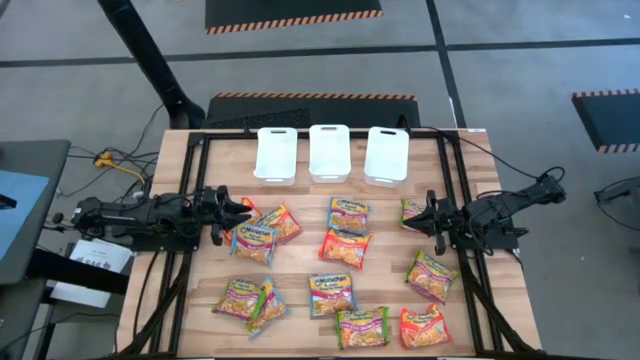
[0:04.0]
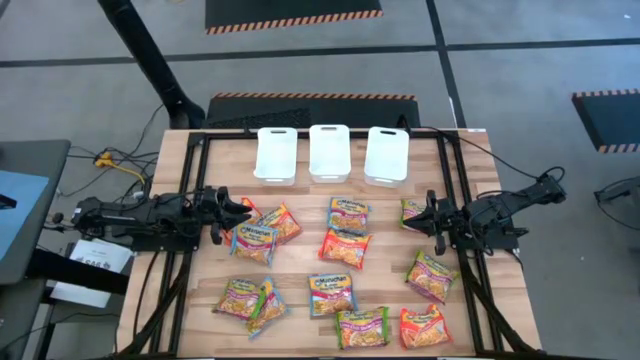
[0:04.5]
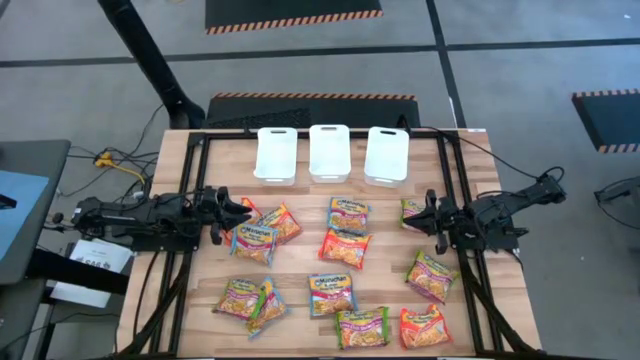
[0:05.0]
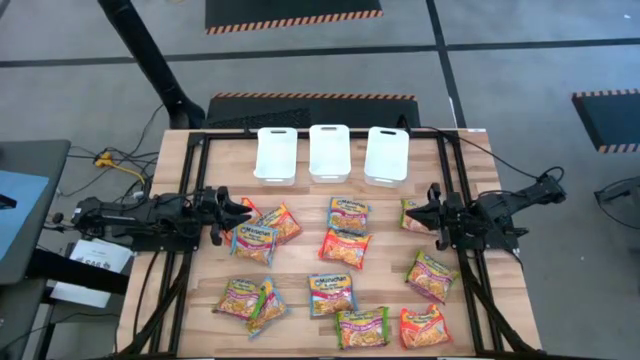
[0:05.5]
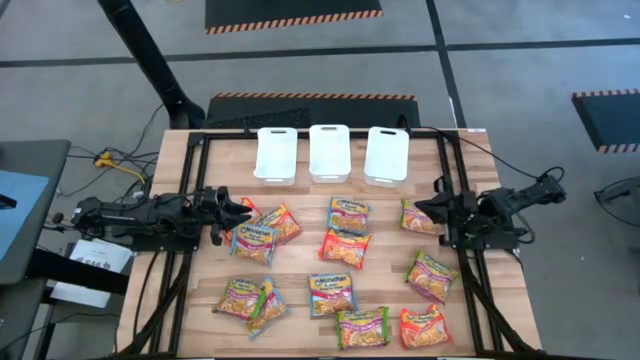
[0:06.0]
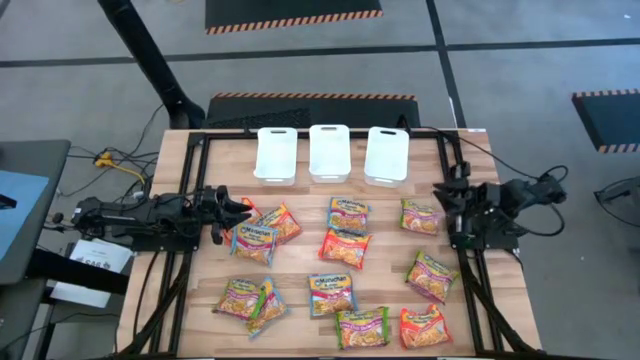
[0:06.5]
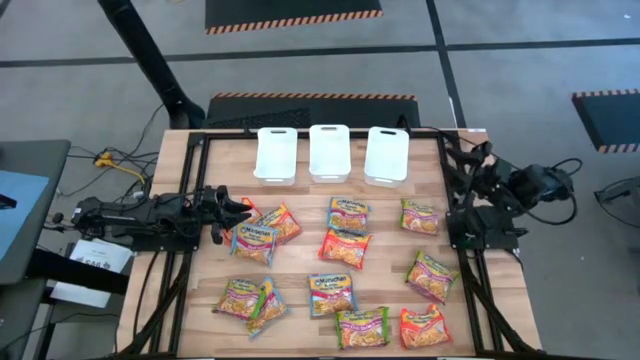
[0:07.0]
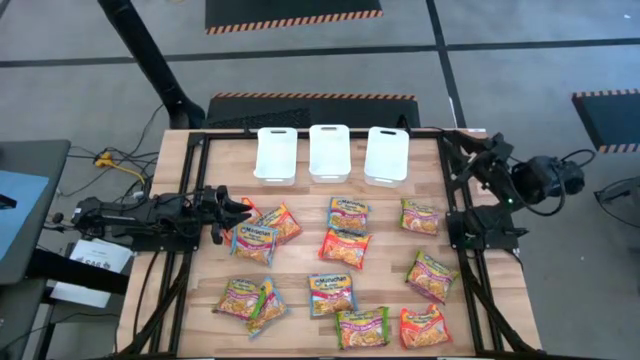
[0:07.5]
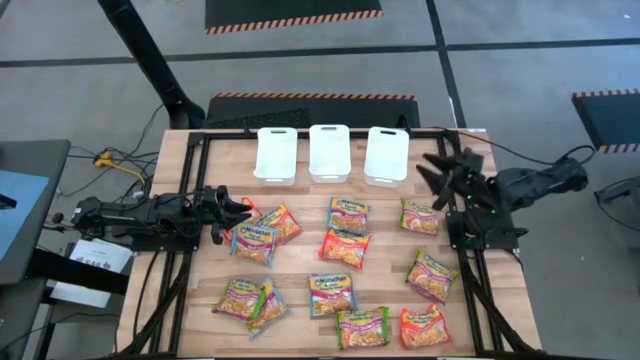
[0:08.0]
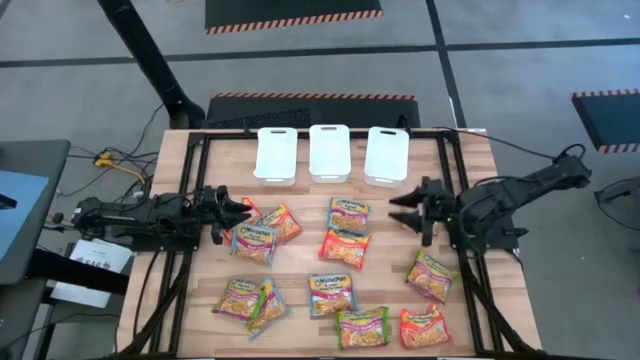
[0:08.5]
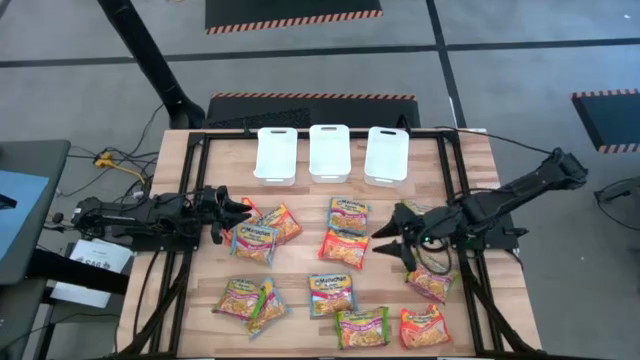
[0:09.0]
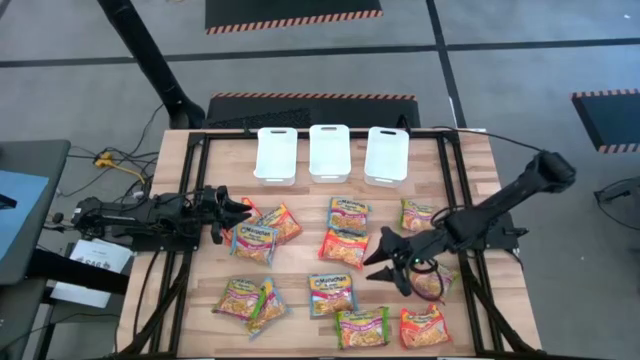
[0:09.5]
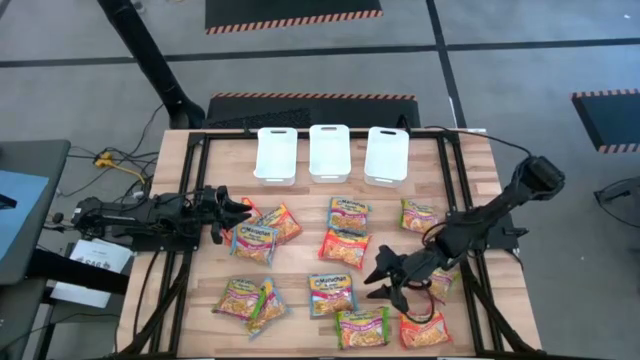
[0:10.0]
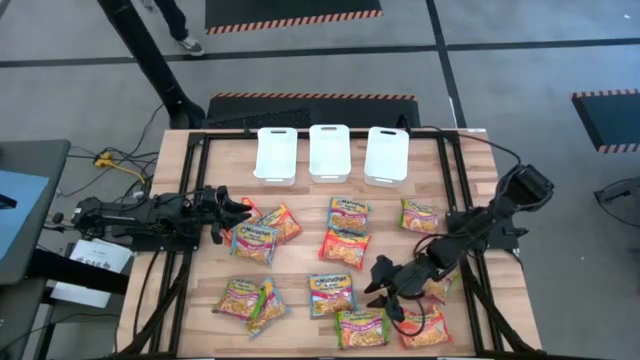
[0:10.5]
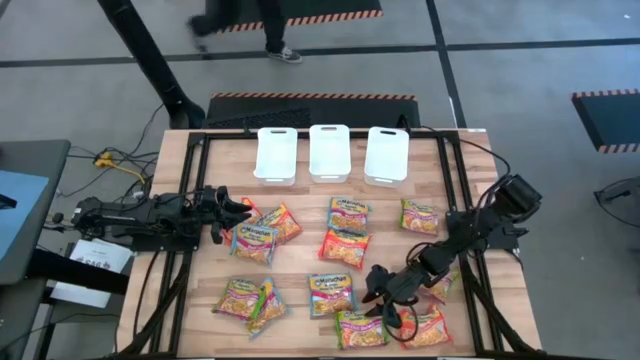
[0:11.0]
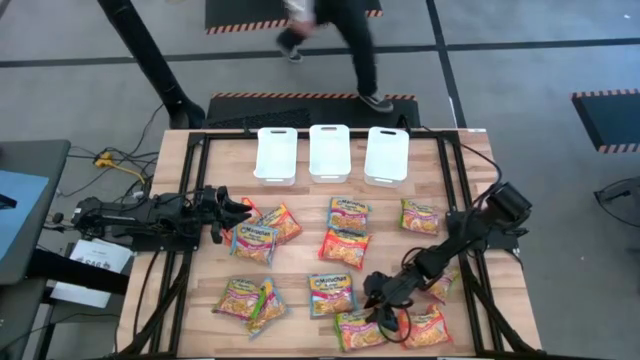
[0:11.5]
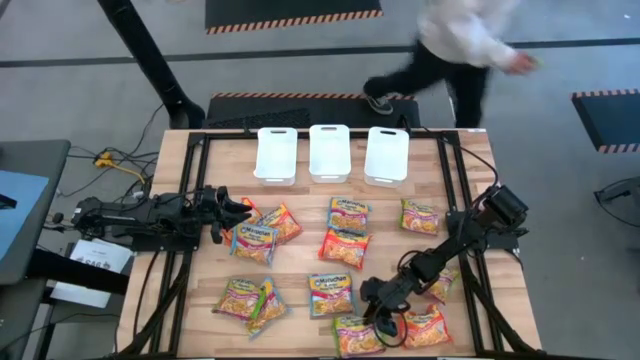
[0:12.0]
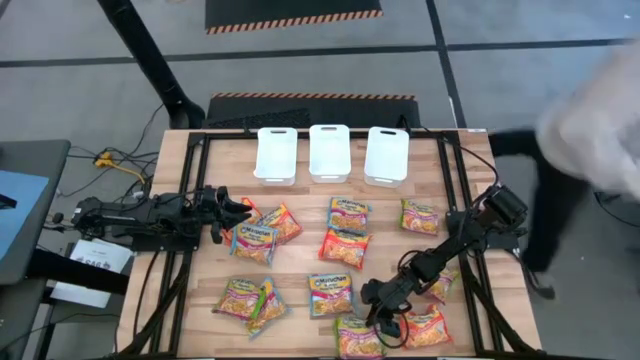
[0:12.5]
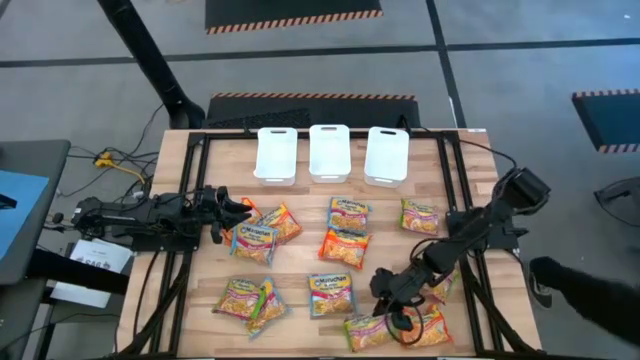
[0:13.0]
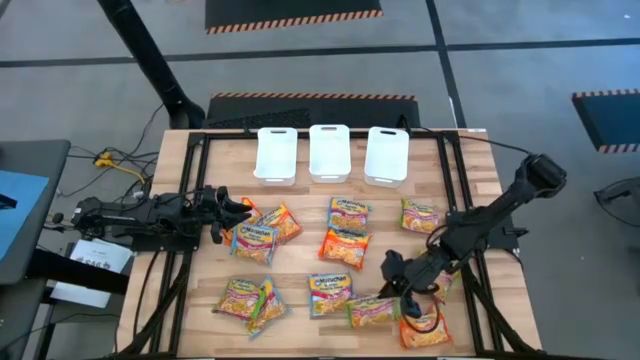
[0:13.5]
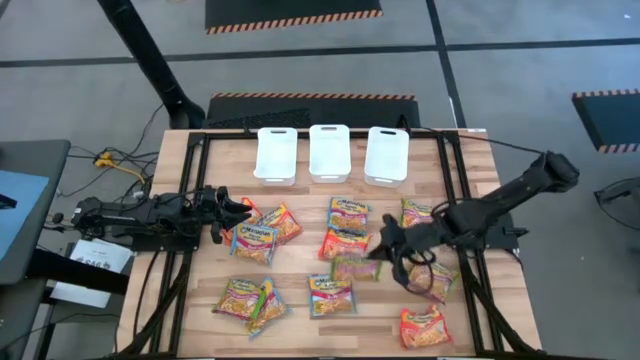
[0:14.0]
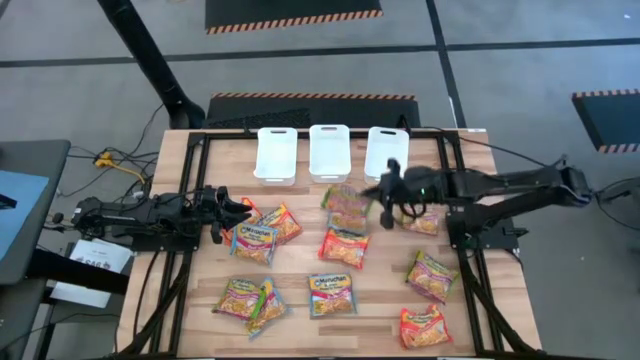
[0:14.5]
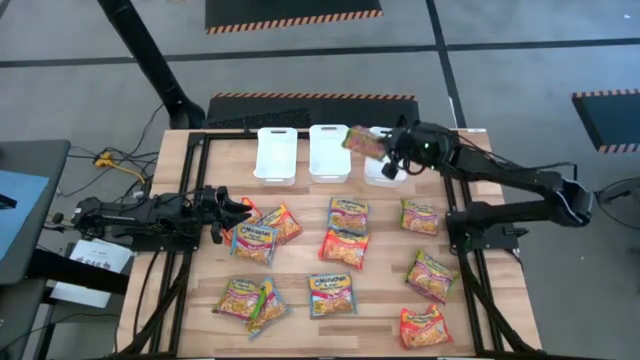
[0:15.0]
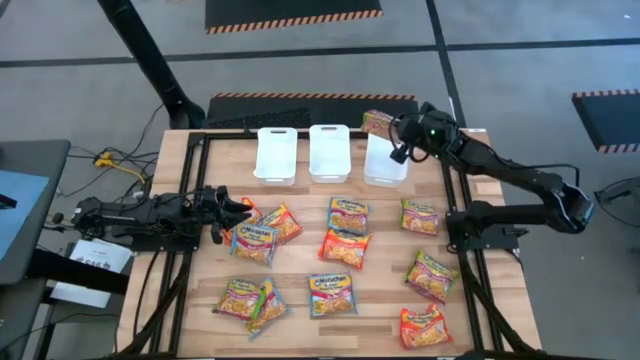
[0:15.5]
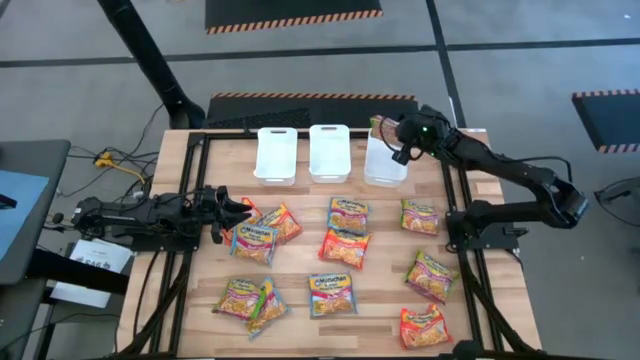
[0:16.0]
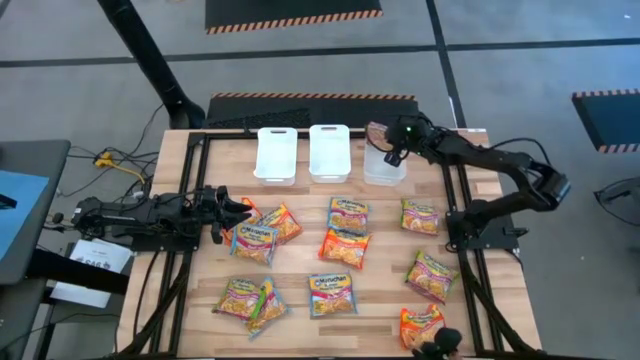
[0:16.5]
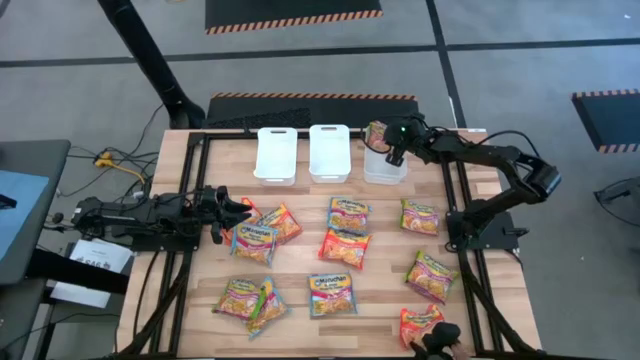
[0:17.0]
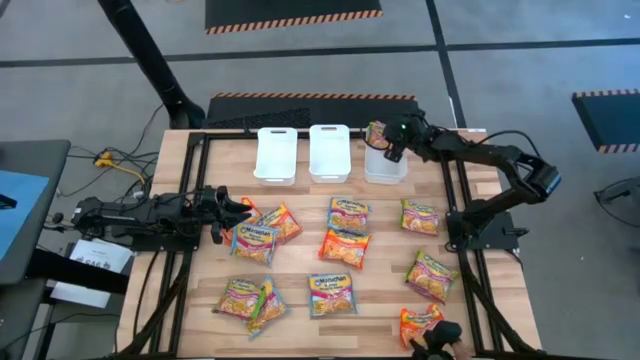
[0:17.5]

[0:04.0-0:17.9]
Task: Sort Maruchan noodles
Put the green noodle pack into the right white bin

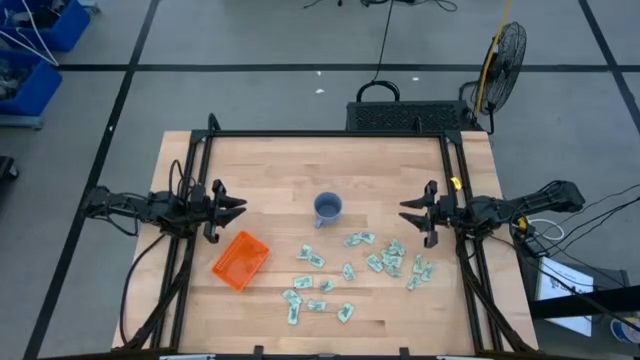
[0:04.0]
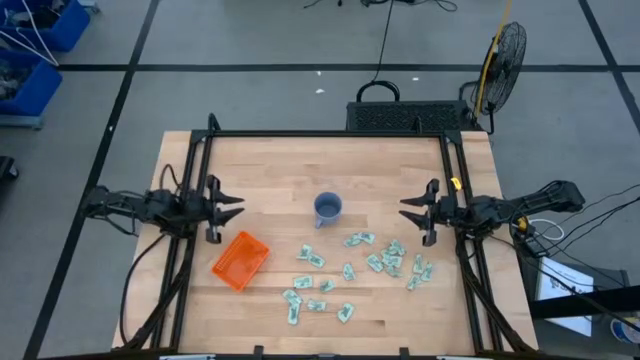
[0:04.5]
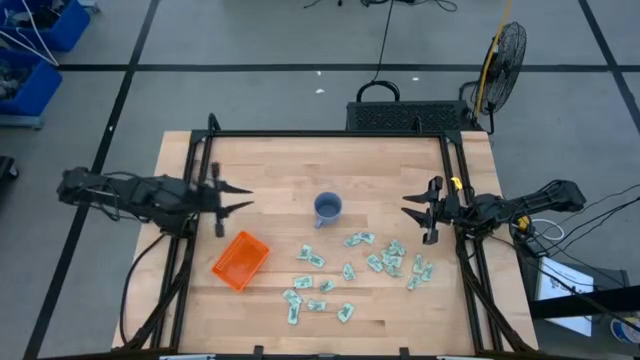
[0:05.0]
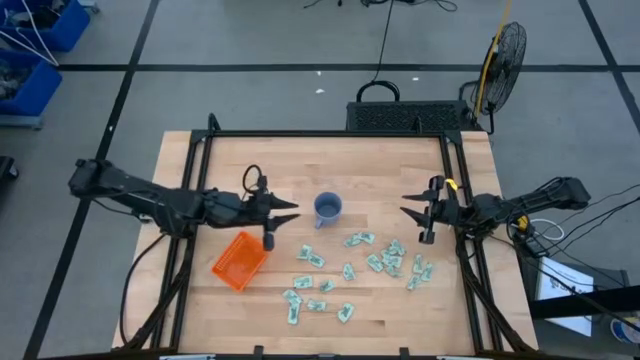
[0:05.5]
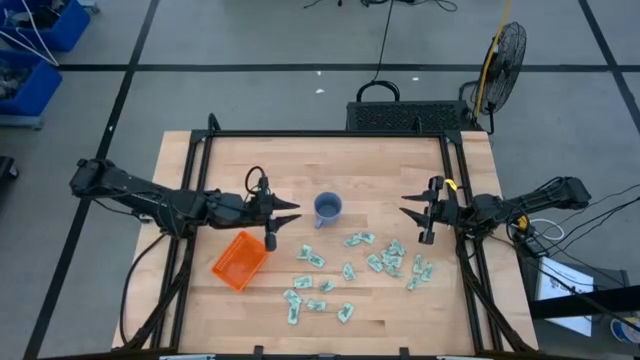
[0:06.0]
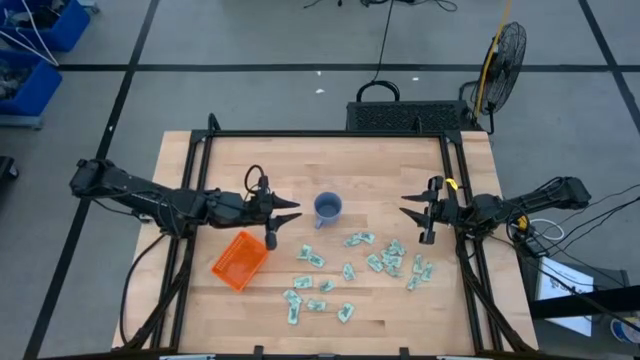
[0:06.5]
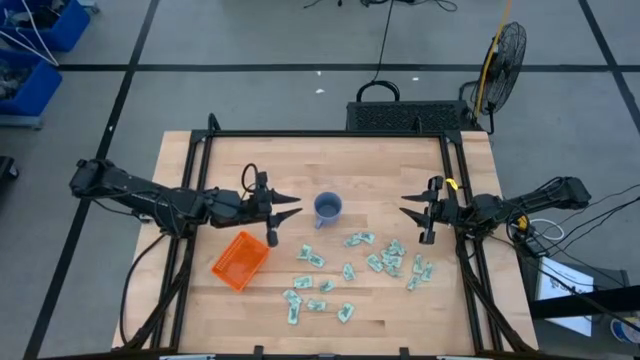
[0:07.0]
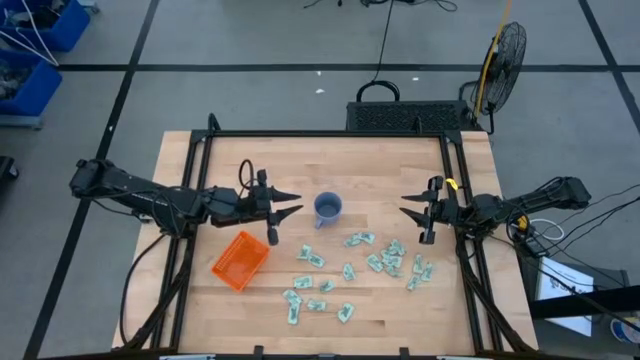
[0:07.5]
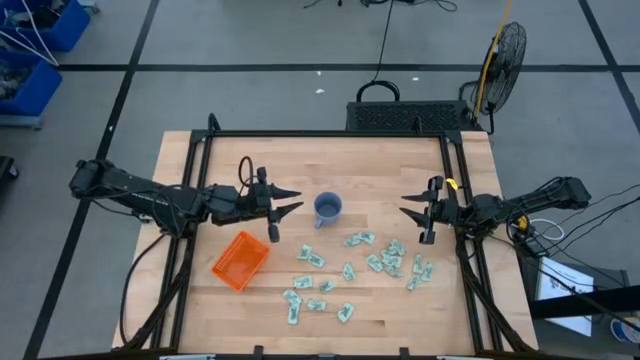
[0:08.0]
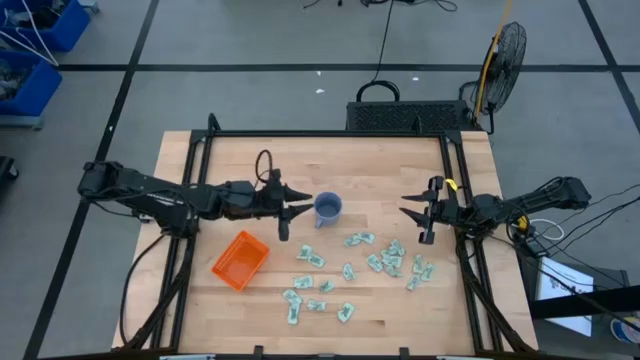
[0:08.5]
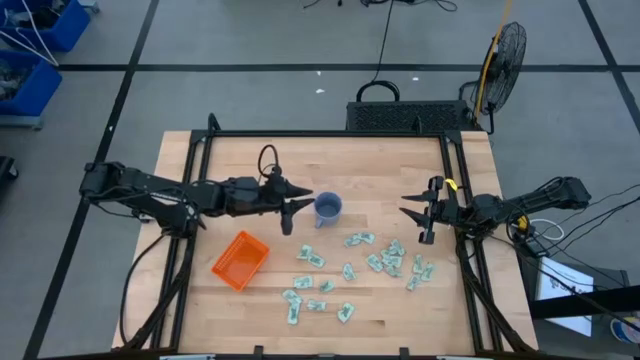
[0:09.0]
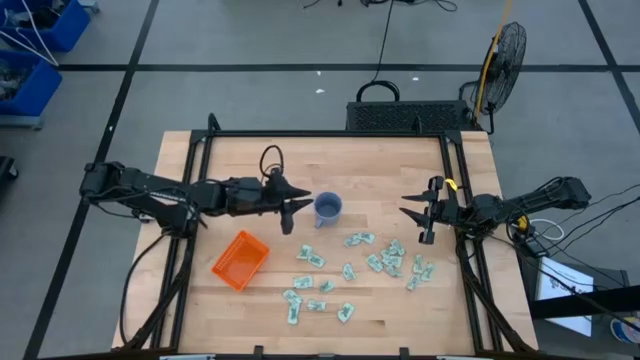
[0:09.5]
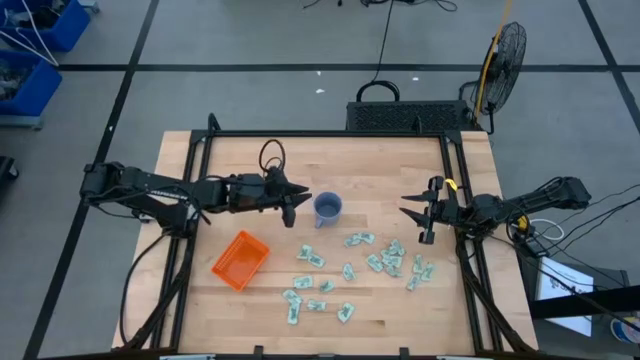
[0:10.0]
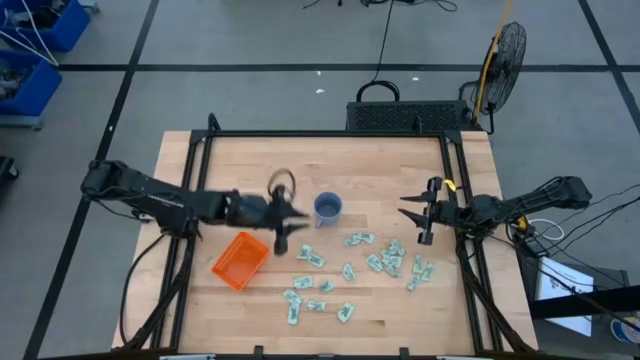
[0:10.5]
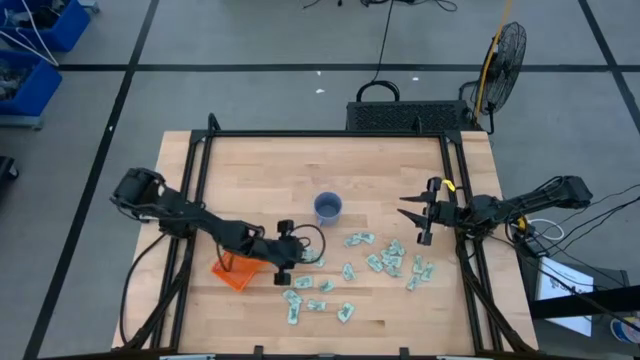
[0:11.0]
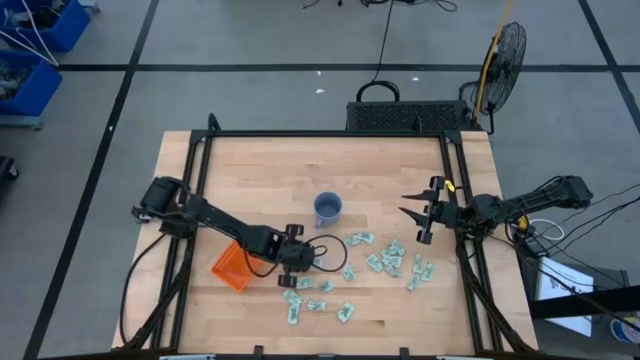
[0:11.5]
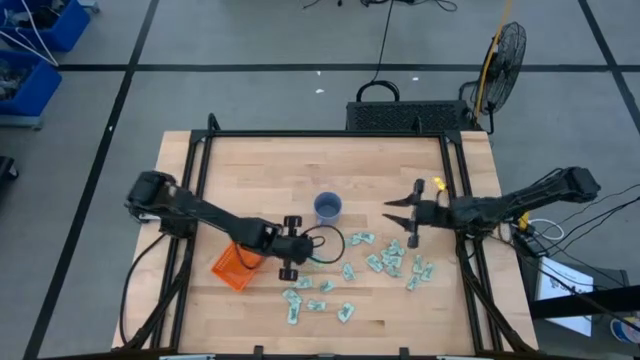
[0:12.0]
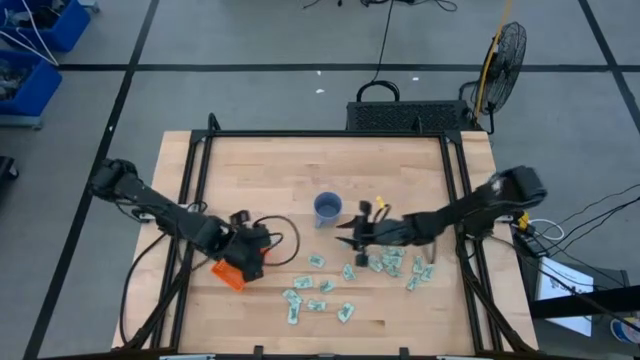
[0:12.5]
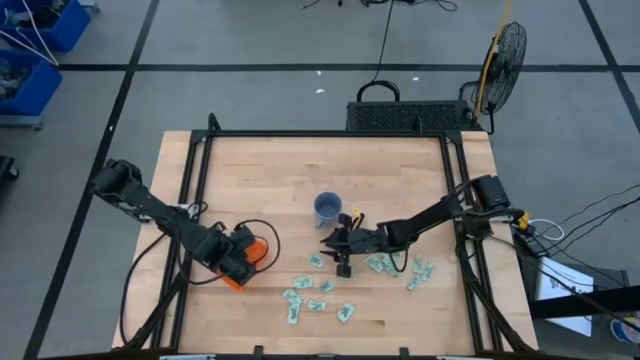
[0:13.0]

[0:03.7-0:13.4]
Task: Pick and place Stevia / Truvia into bins
Put the green stevia packet into the orange basket
